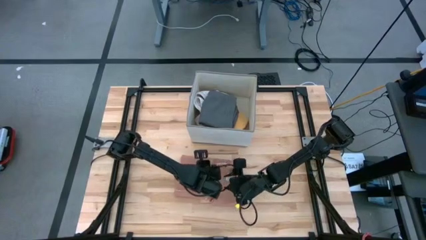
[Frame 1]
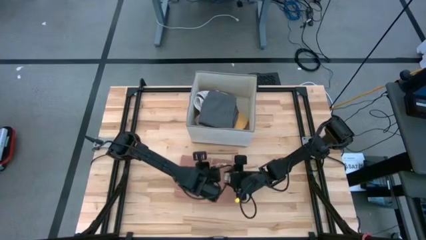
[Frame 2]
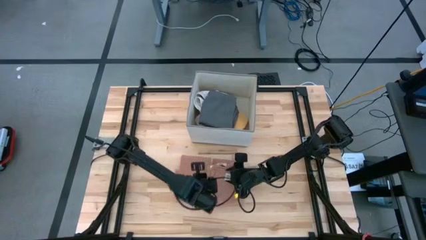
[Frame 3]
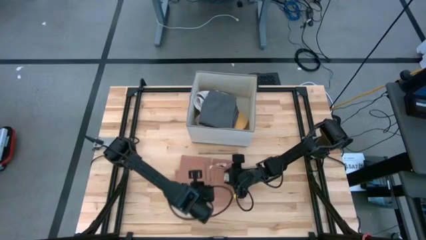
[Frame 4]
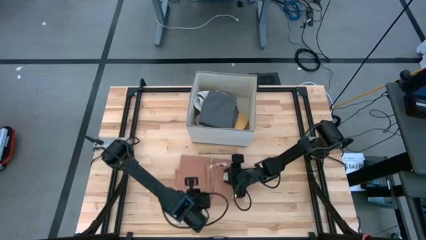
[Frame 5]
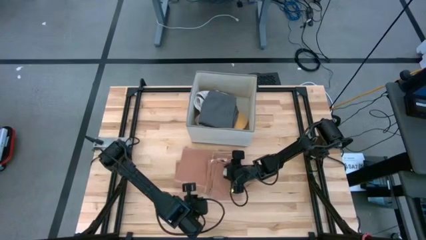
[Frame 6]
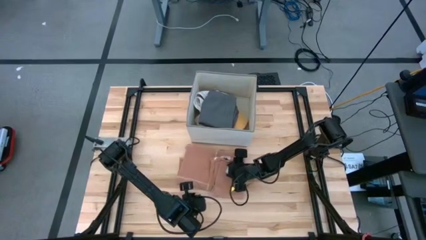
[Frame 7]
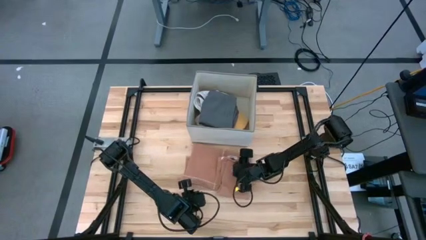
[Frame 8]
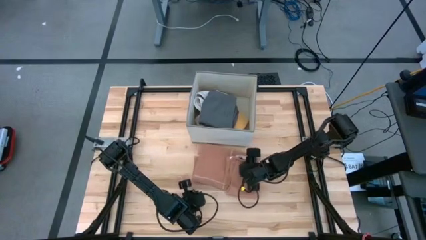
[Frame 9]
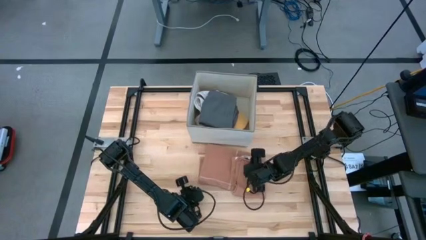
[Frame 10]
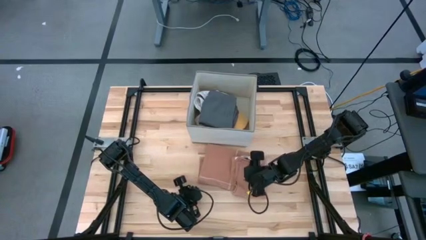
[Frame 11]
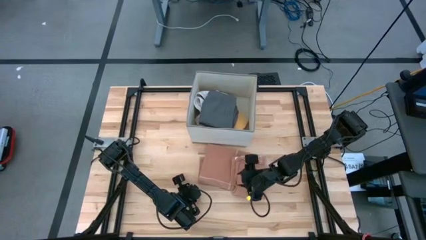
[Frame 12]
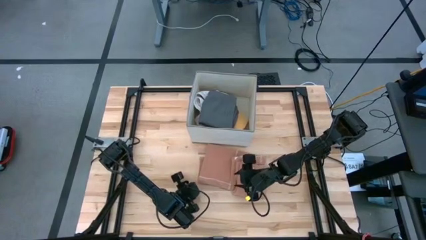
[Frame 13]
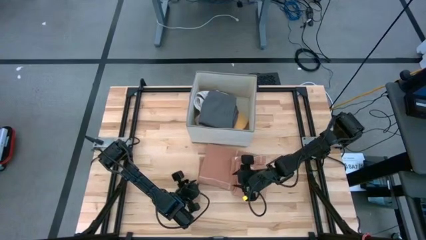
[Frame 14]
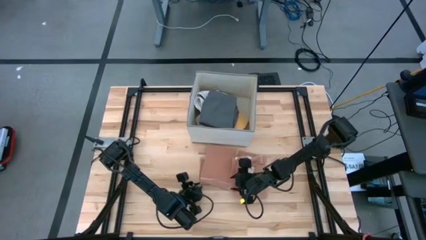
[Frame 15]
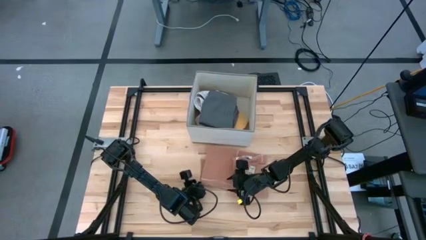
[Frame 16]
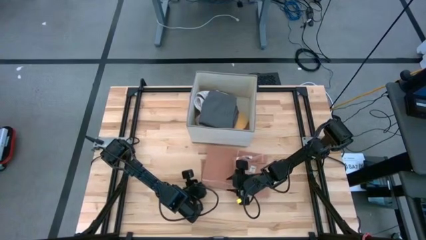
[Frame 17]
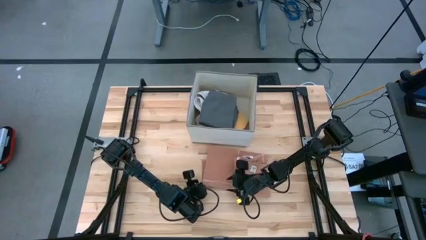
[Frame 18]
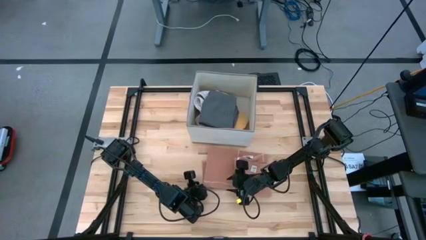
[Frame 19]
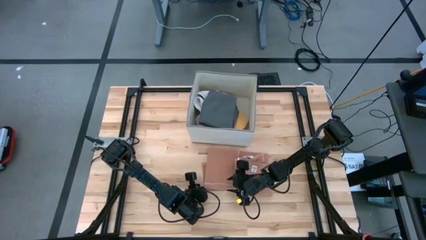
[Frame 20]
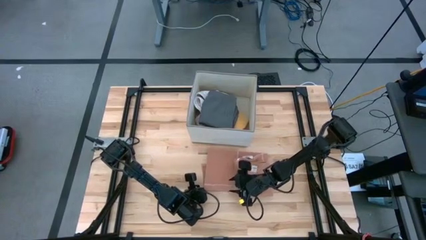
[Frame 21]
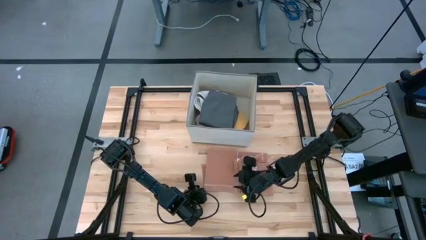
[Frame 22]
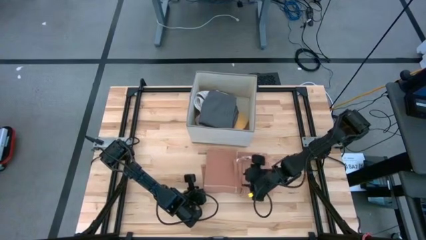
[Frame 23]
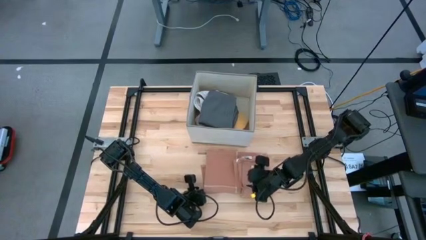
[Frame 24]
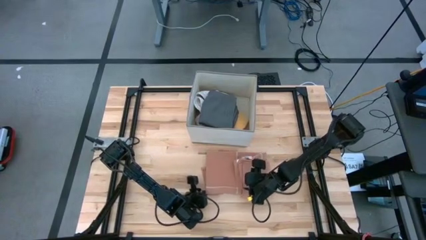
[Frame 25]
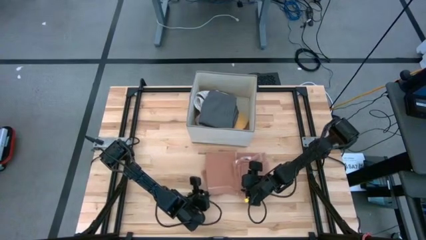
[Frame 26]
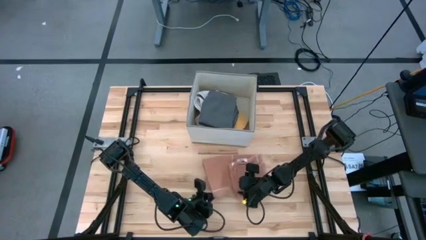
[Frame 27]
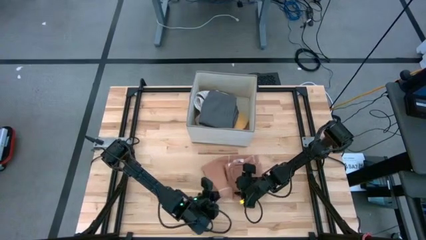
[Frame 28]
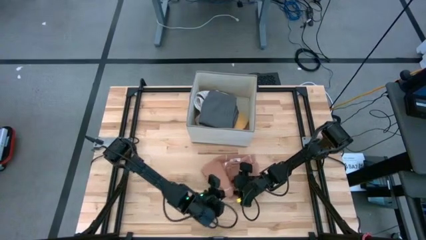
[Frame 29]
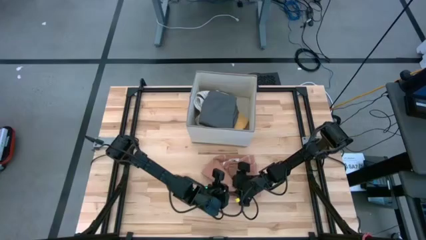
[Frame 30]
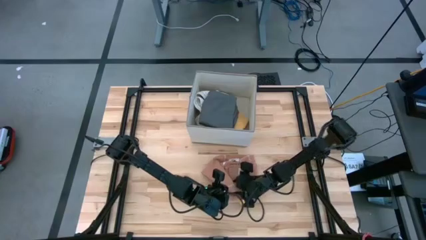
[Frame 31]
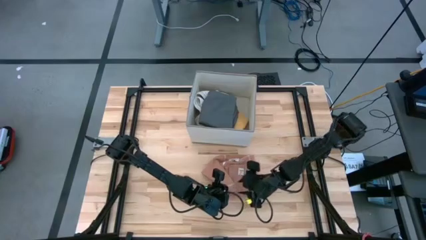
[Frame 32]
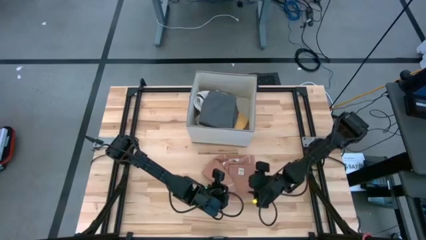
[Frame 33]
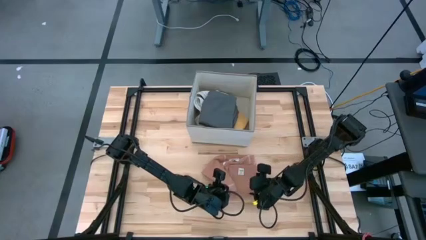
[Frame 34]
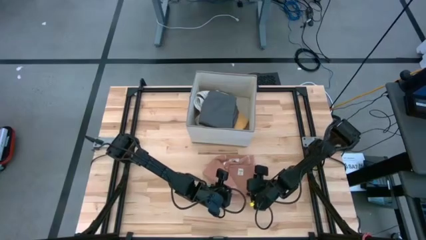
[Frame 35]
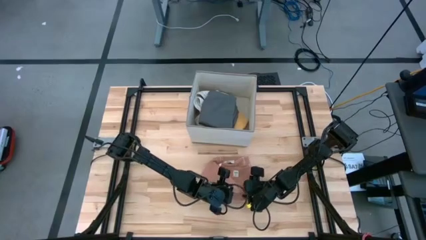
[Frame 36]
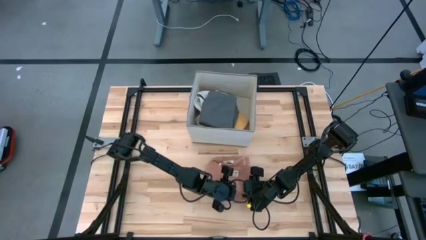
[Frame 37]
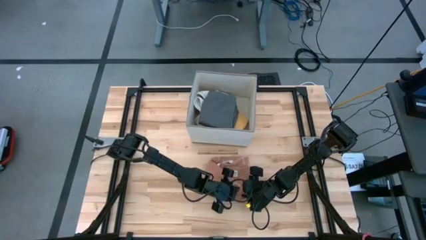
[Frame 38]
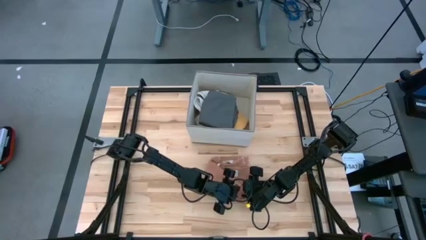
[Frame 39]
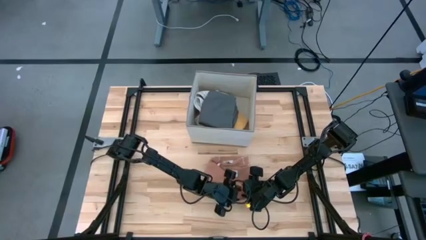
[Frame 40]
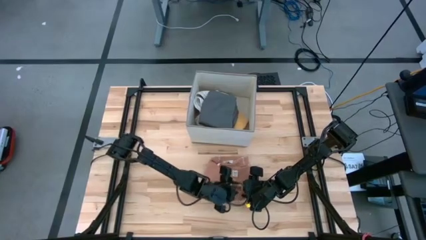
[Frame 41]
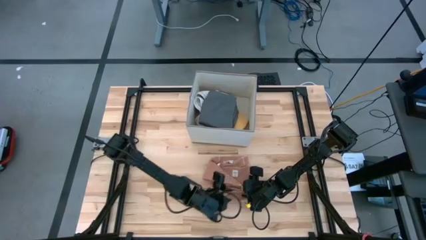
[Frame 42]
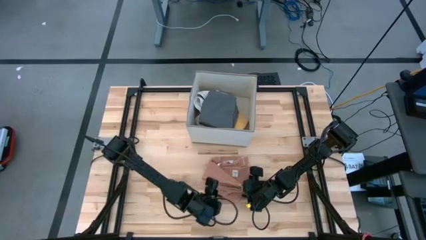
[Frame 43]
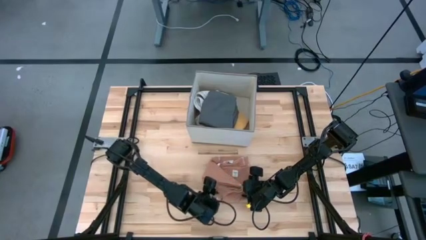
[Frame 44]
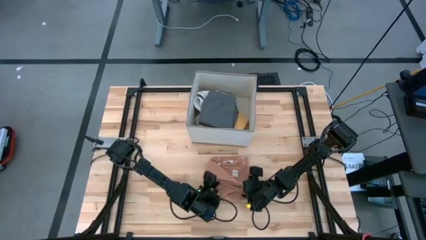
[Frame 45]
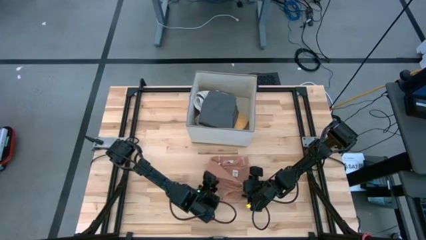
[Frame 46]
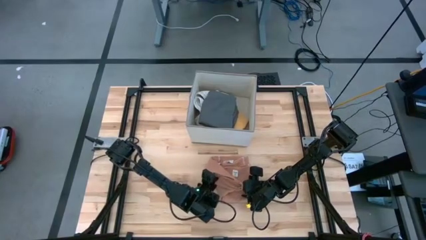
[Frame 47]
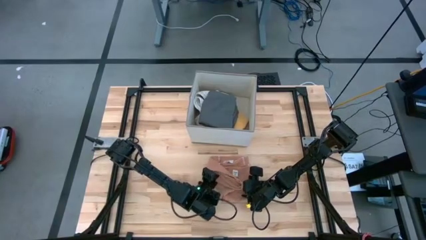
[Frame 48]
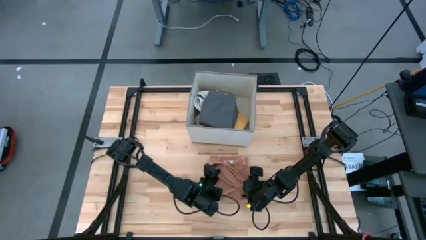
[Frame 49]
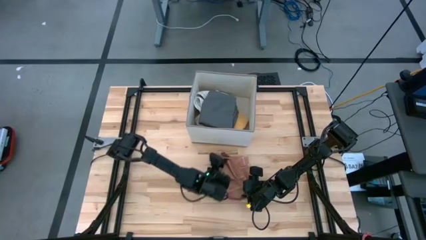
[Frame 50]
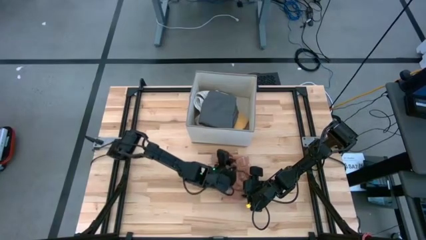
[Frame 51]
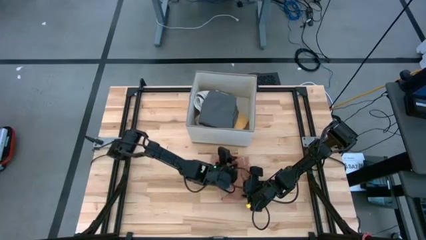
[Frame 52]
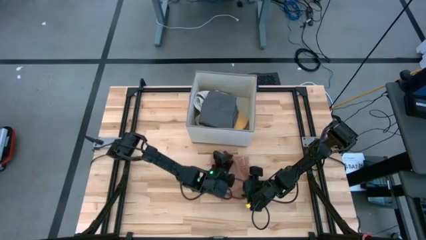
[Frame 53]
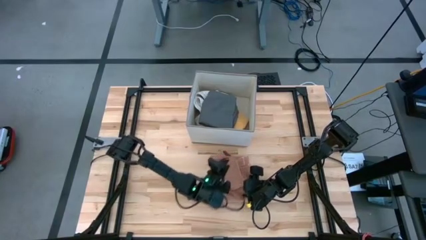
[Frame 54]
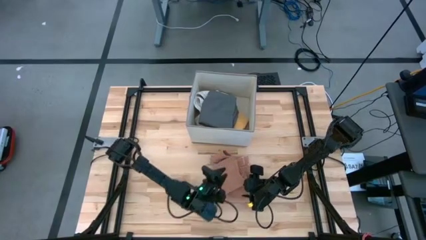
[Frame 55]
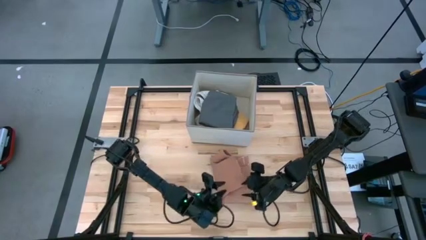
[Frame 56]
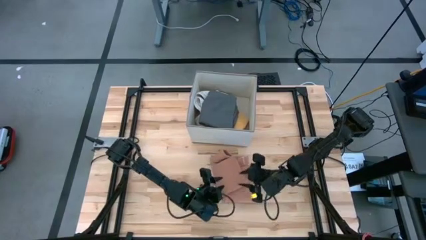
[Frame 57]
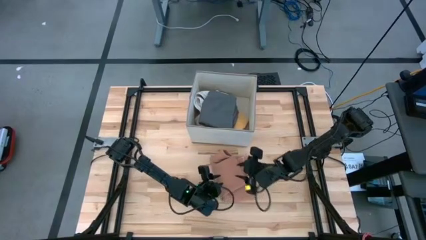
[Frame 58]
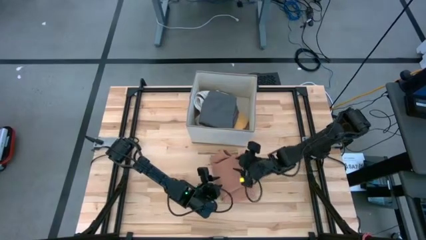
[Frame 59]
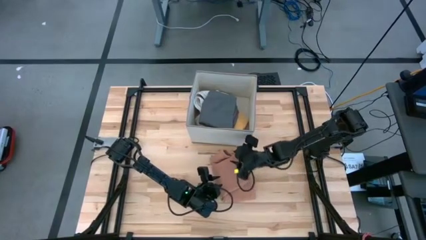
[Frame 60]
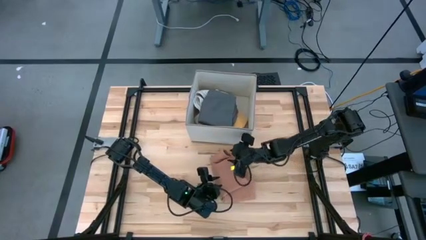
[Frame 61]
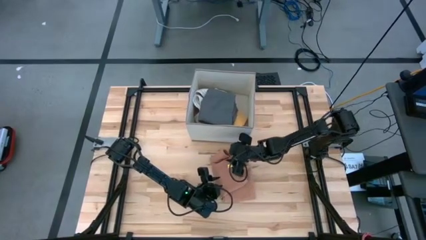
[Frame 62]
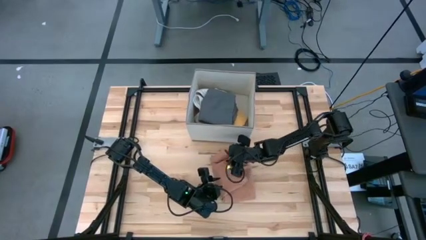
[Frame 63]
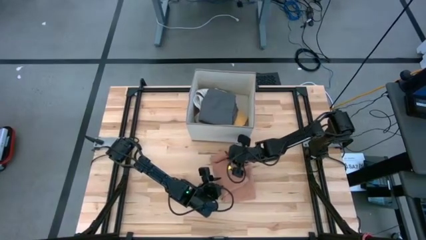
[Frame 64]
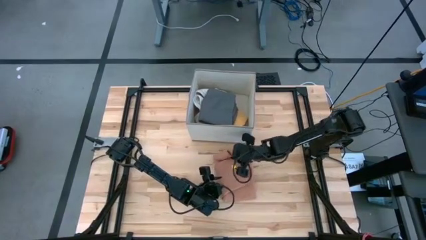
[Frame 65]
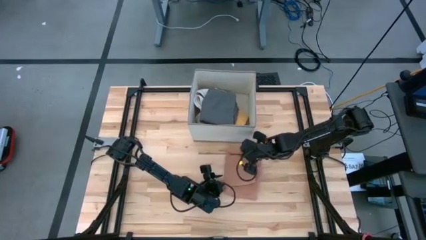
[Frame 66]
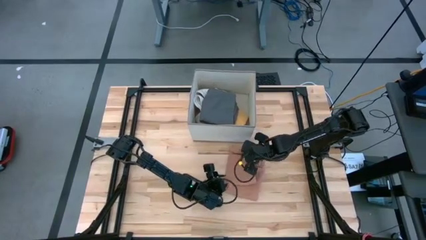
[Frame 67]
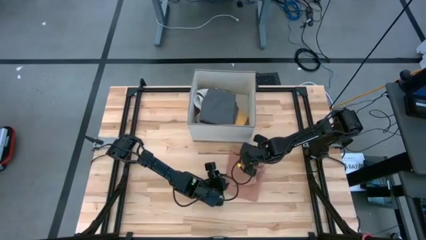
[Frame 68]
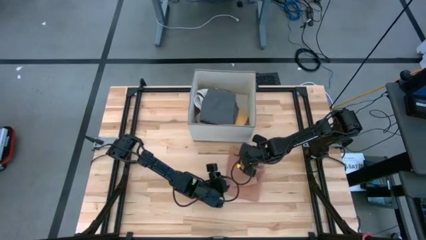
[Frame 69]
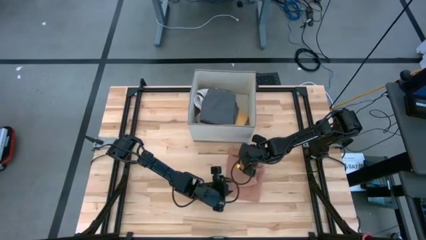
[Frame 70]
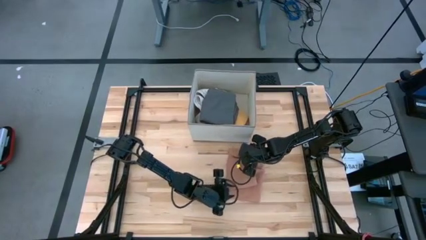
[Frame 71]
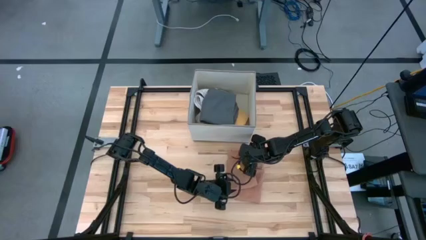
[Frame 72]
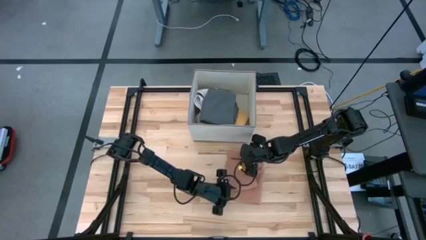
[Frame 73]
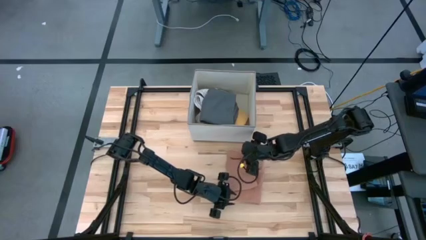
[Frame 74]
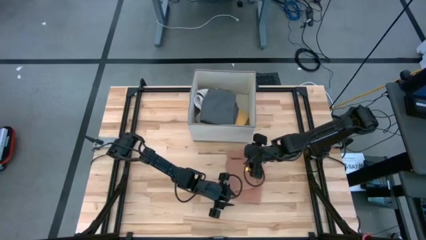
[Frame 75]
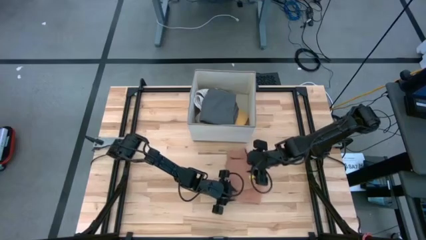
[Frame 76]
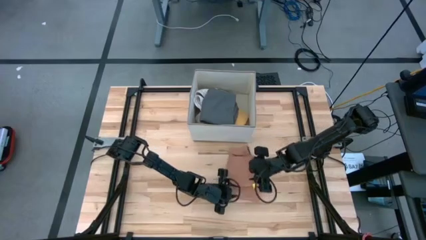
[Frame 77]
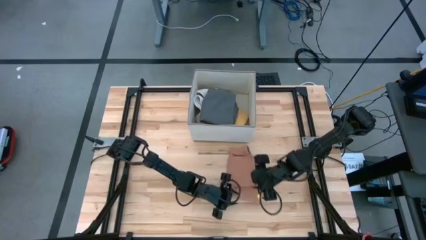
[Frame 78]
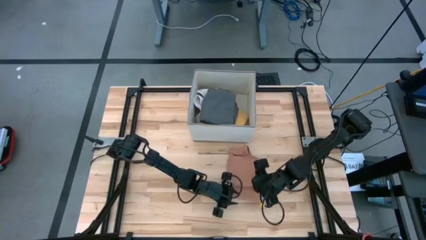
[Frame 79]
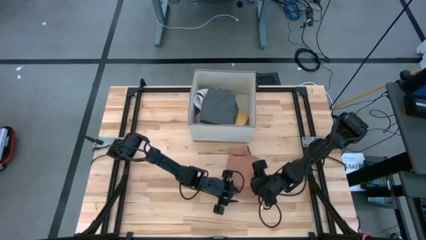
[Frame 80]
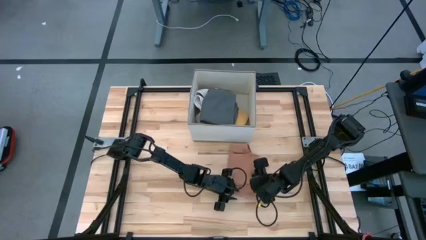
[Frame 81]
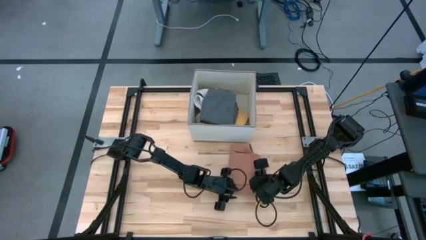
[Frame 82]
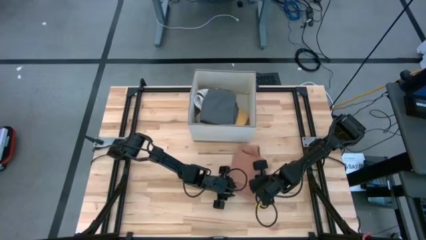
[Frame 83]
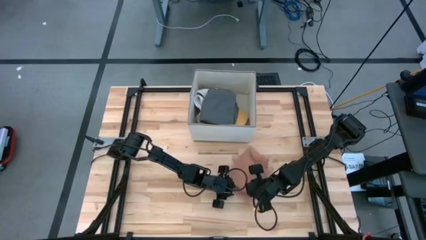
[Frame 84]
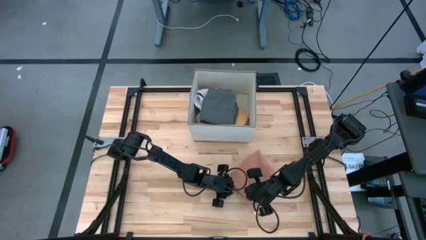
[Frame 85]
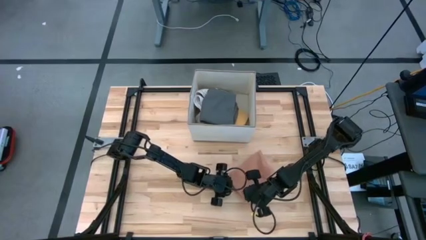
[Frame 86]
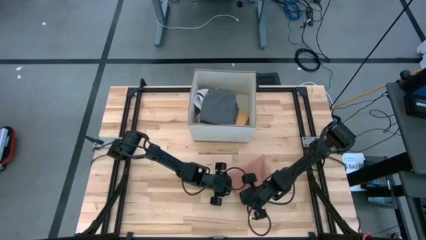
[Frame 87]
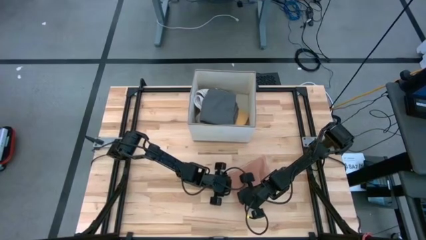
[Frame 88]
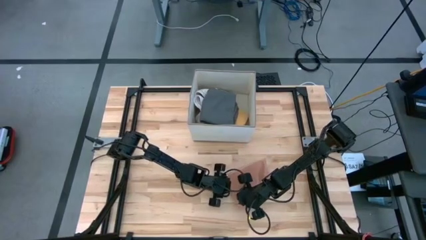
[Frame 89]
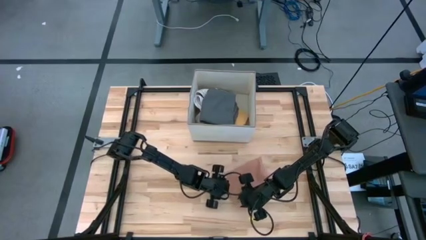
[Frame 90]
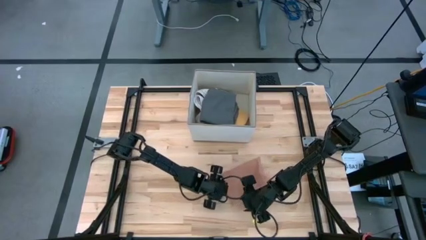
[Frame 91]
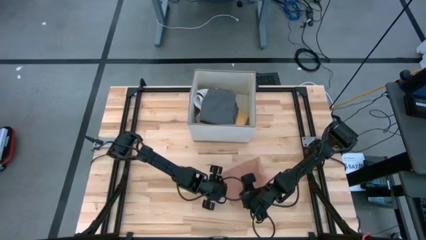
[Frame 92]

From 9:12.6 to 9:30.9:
Task: Fold towel
Fold the brown towel with white checkered lines
